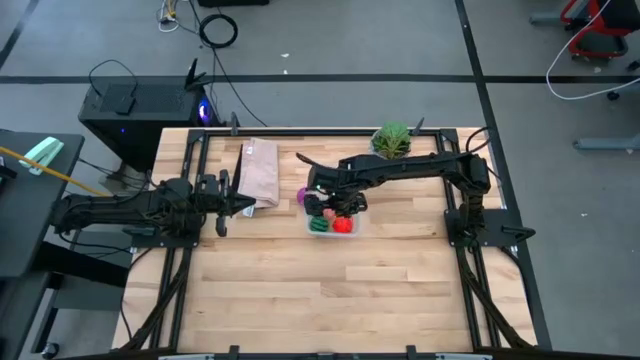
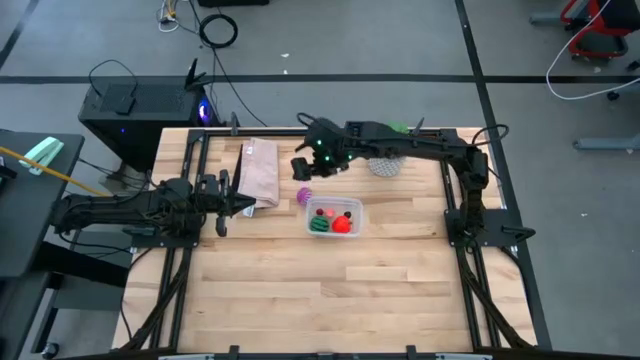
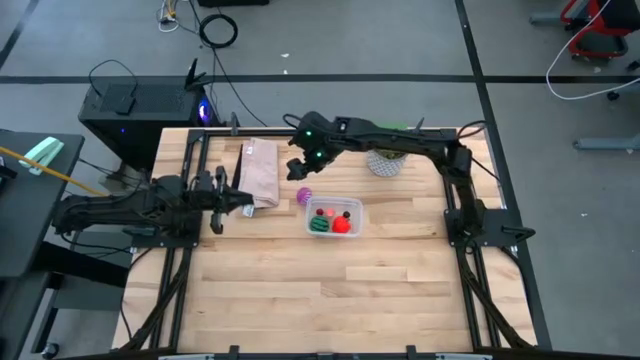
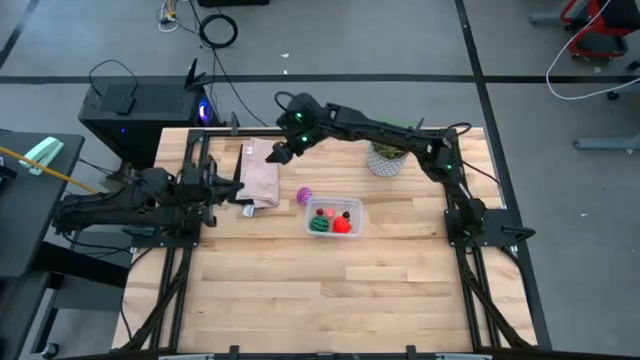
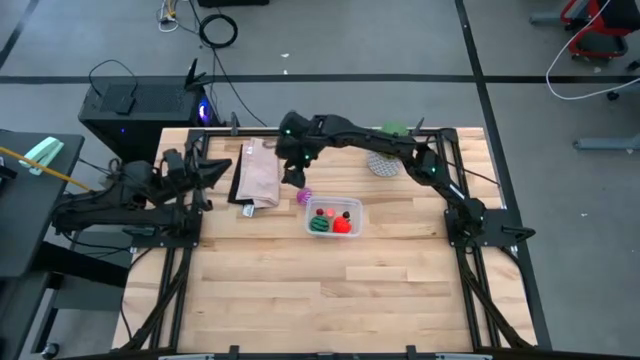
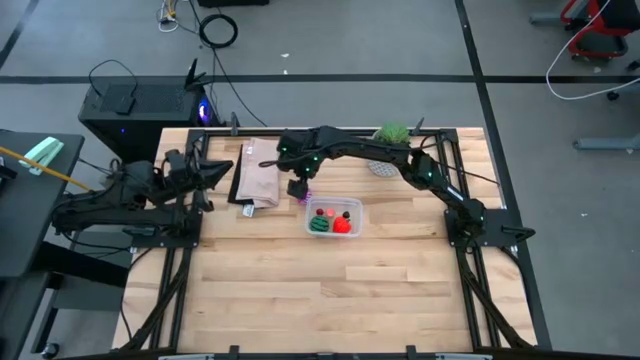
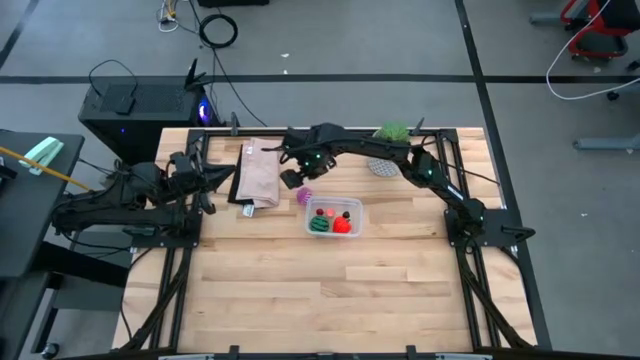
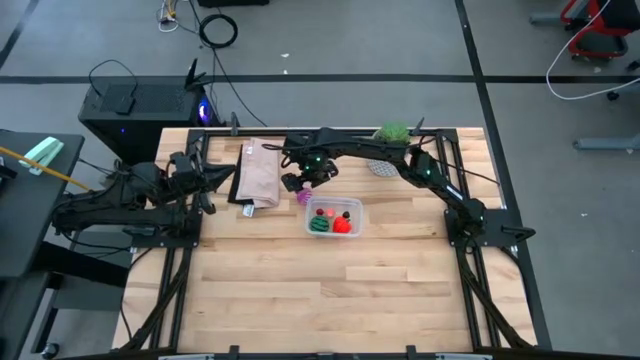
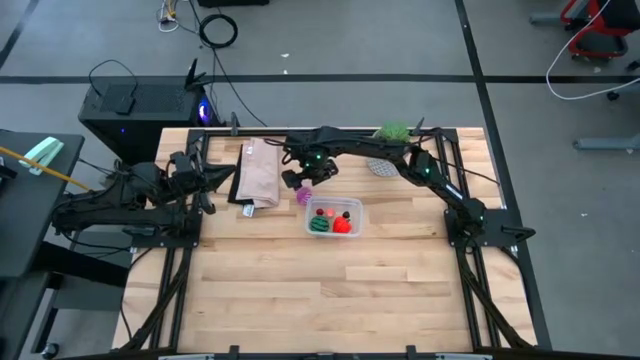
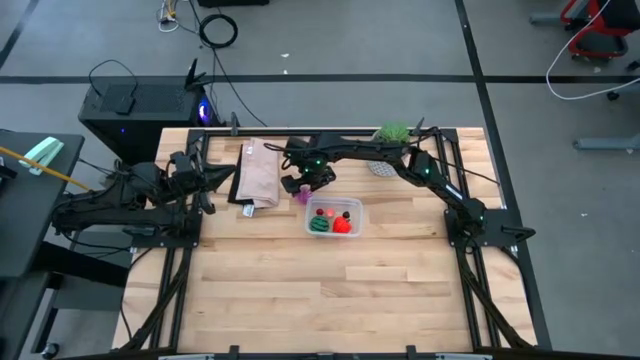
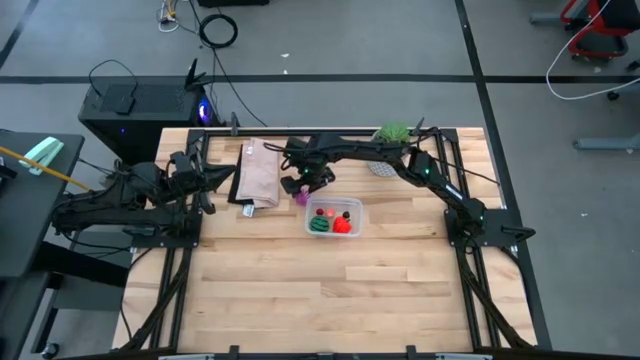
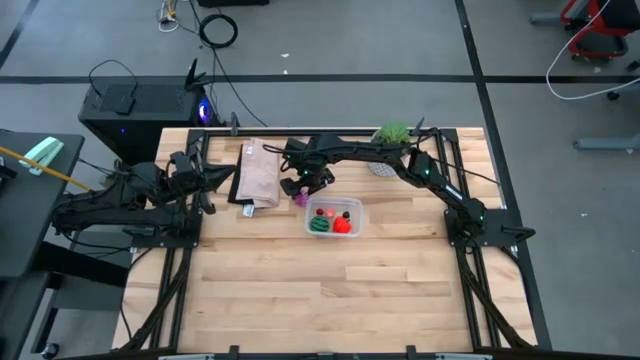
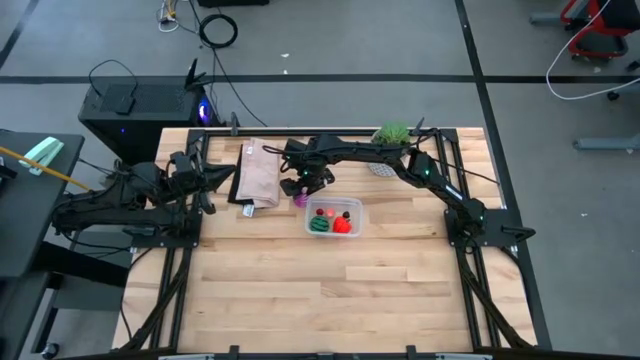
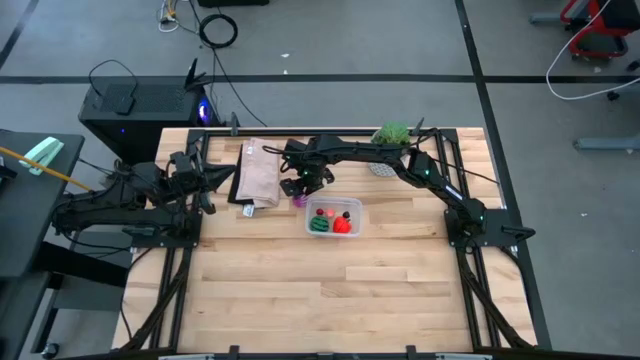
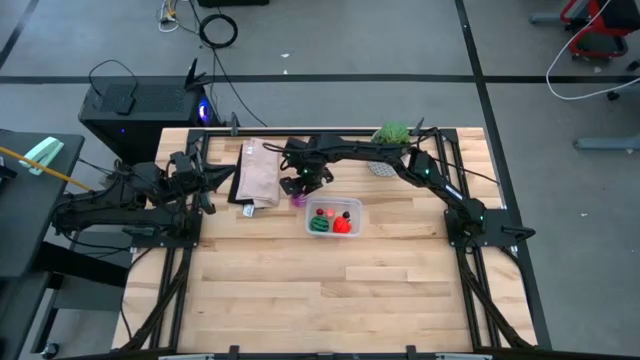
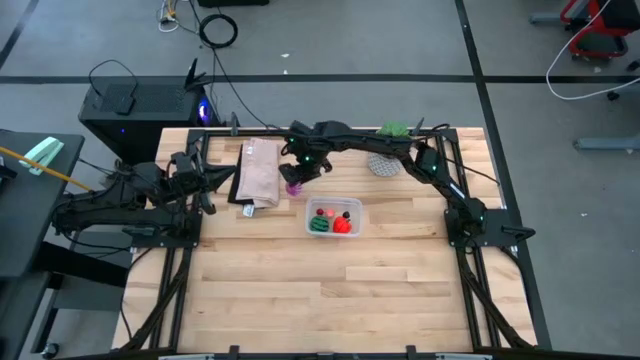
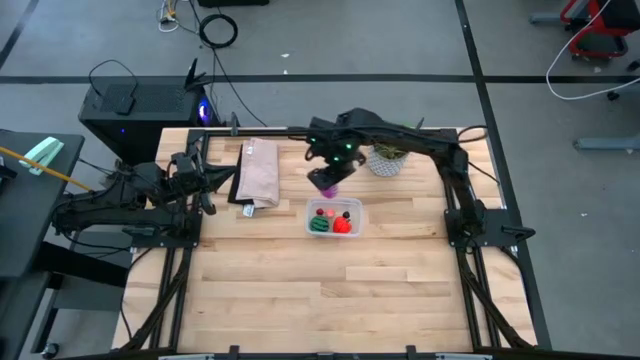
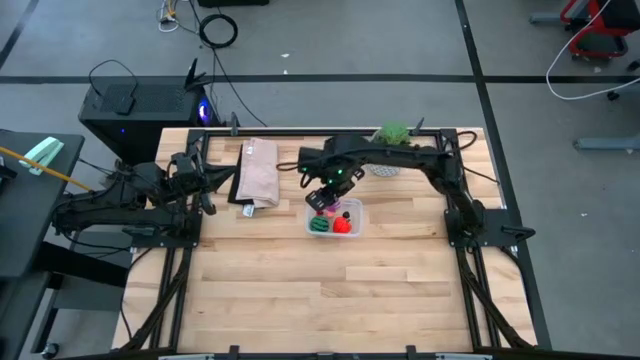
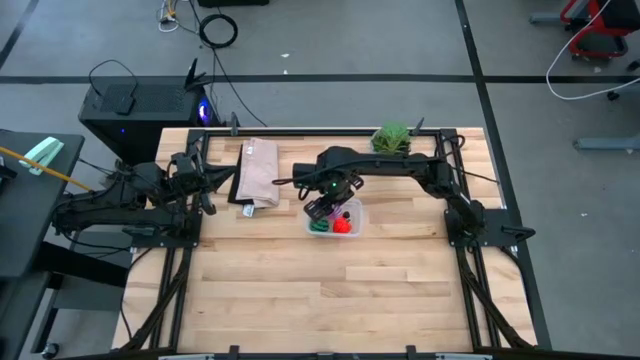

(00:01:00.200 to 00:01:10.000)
Task: Pick and placing Produce into tupperware
Put the onion into the transparent bin

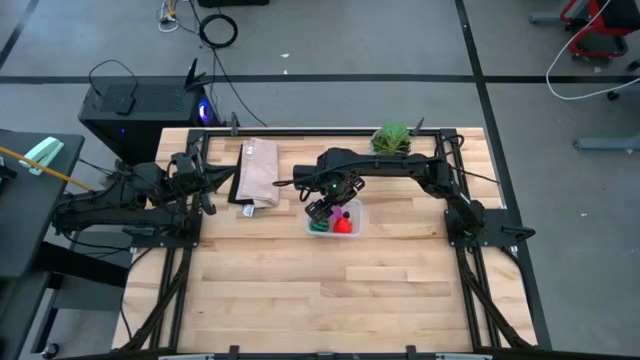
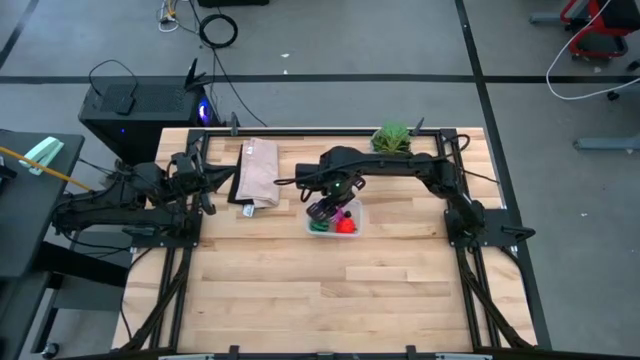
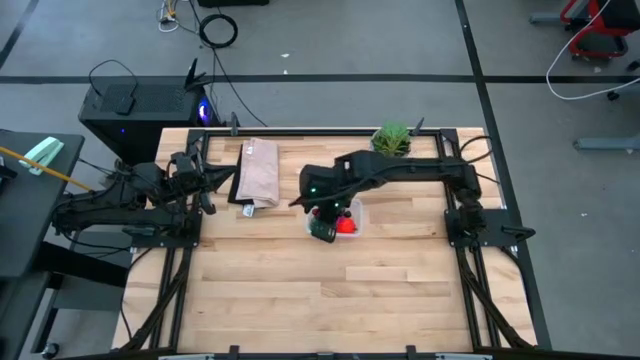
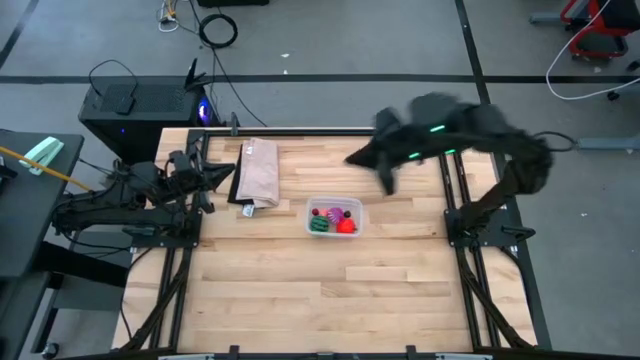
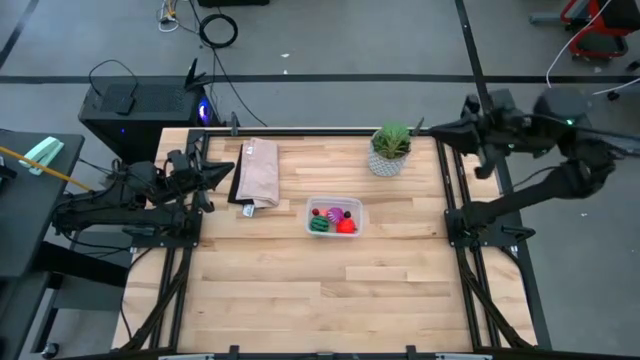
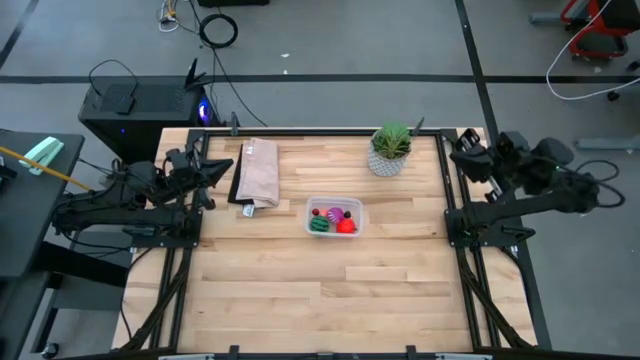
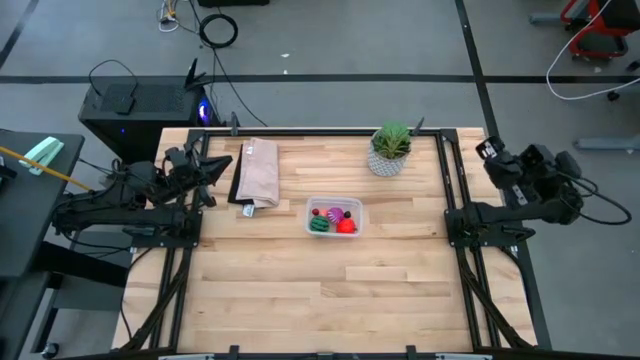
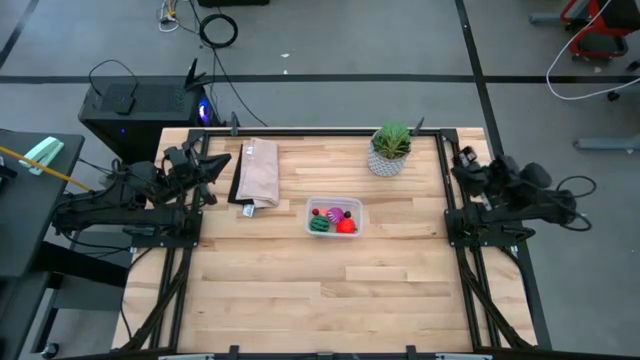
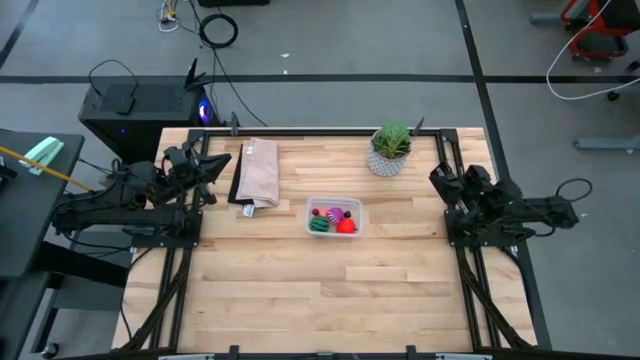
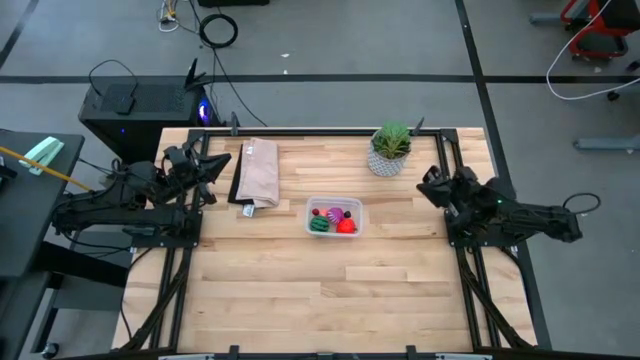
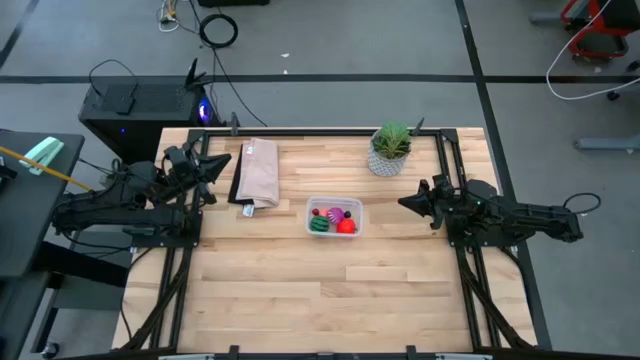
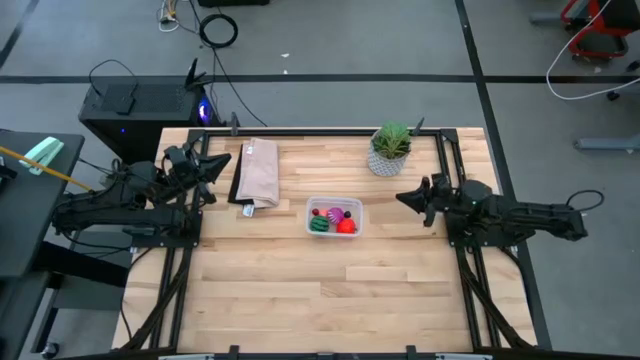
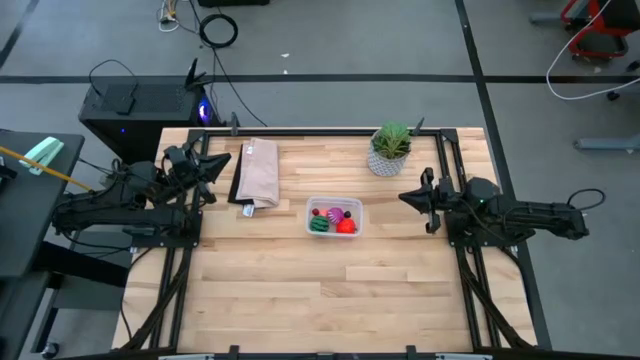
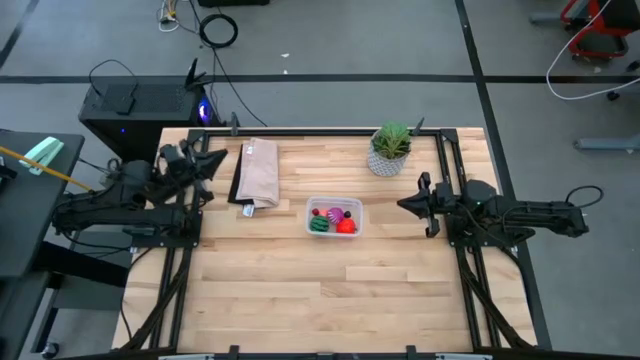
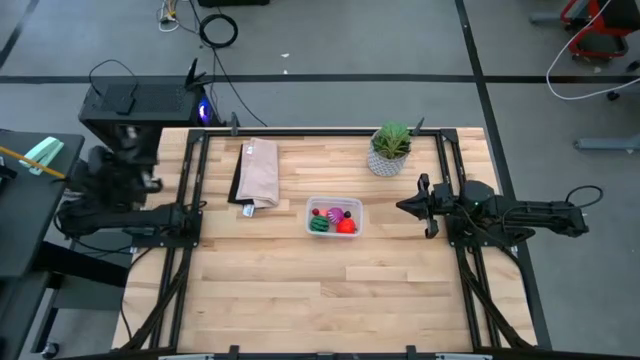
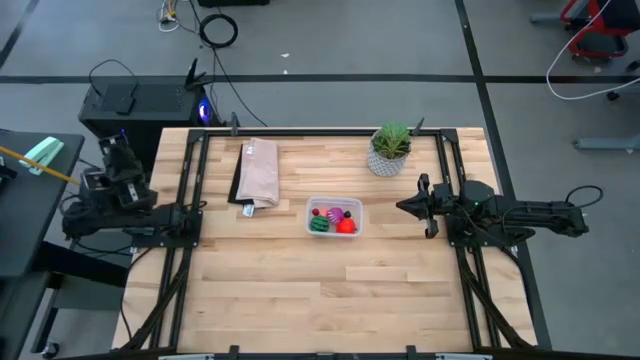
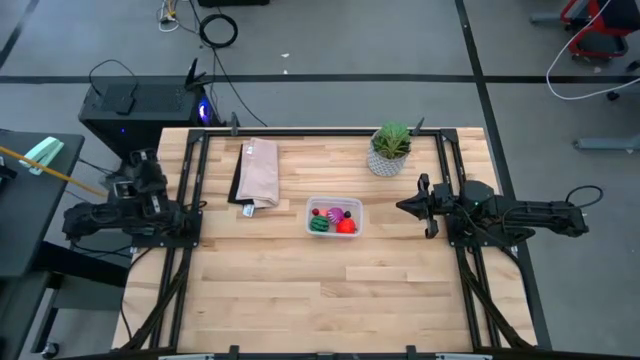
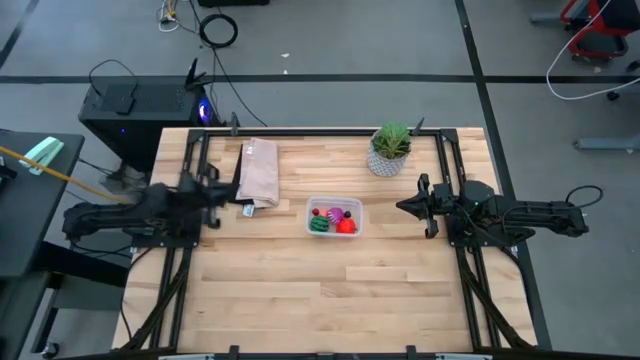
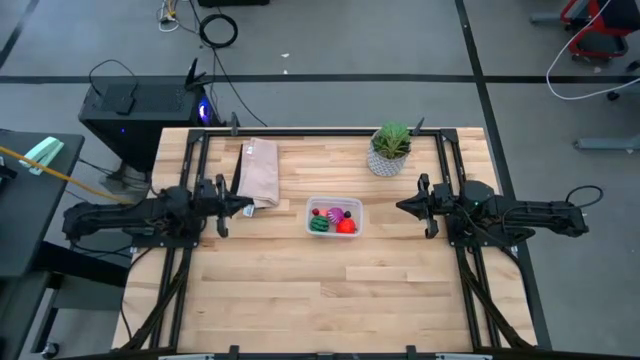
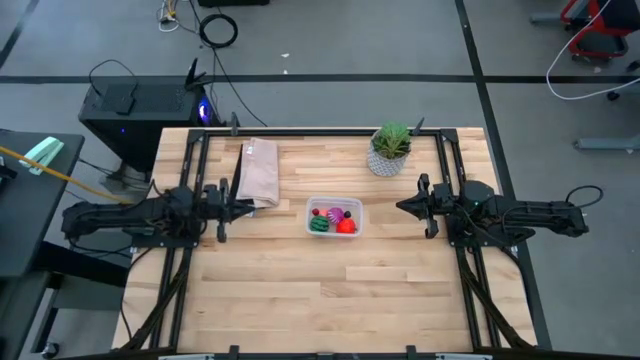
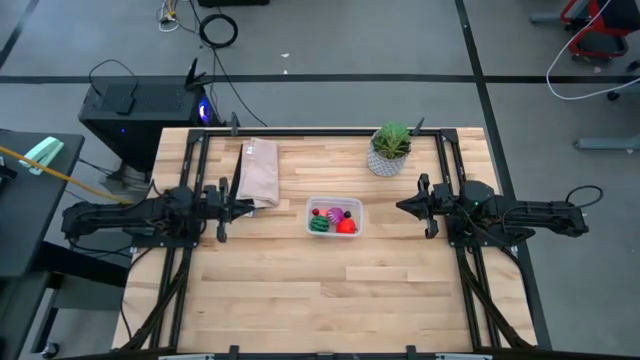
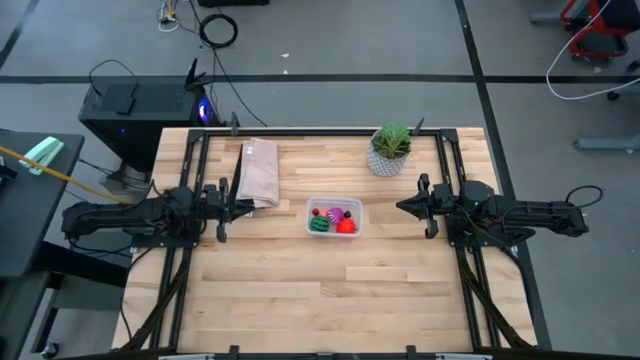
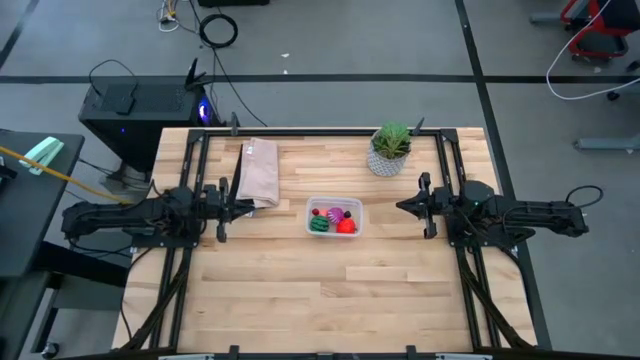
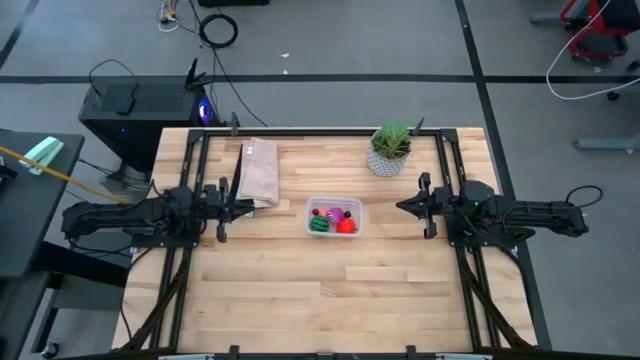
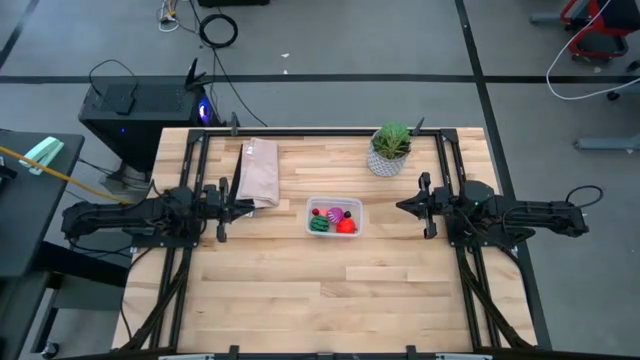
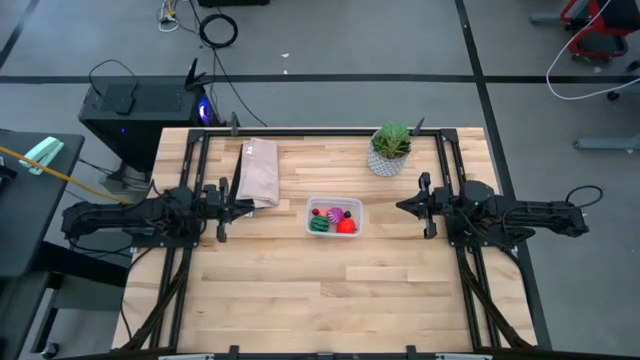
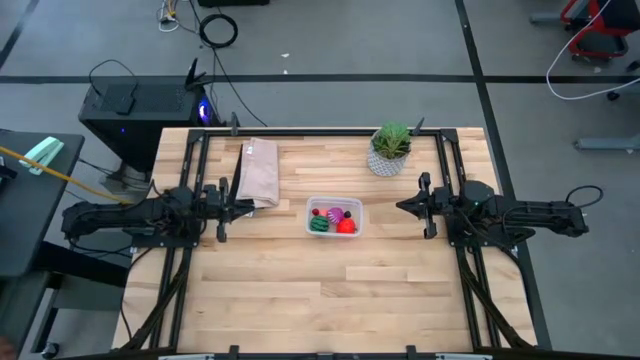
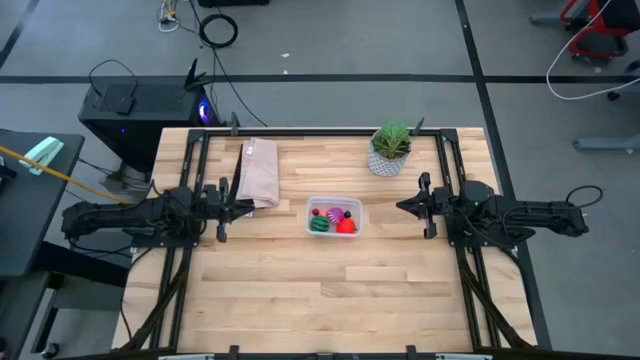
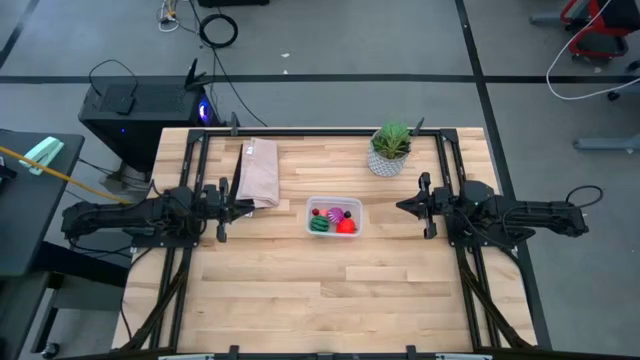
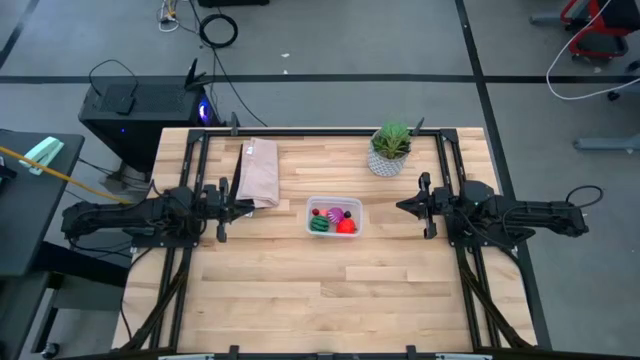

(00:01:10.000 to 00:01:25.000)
Return to Home Position
